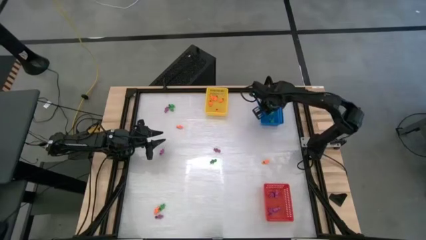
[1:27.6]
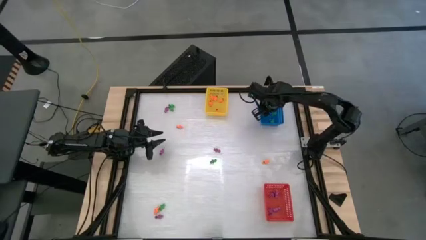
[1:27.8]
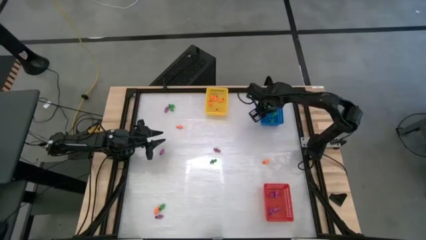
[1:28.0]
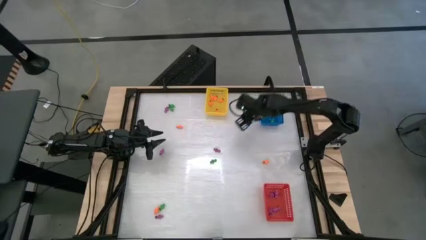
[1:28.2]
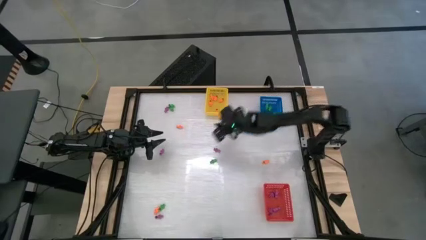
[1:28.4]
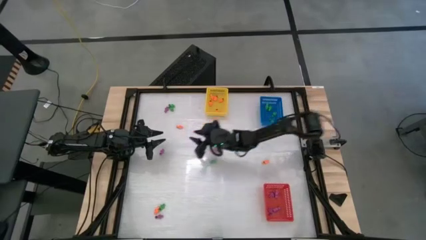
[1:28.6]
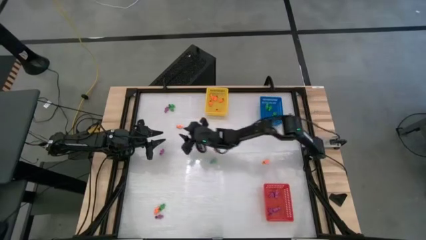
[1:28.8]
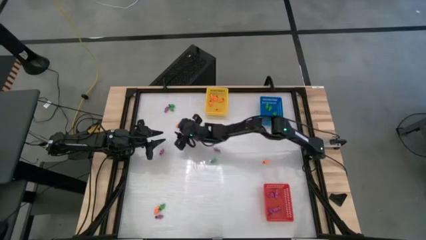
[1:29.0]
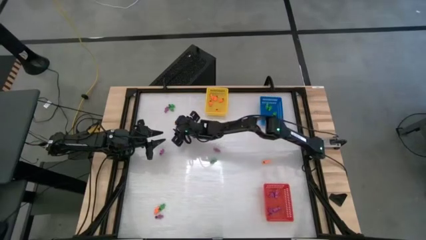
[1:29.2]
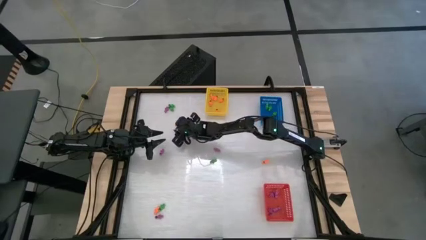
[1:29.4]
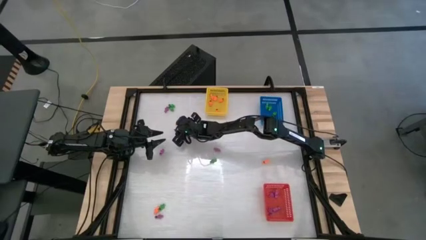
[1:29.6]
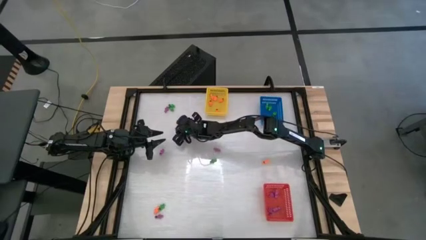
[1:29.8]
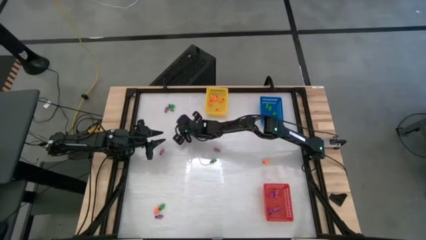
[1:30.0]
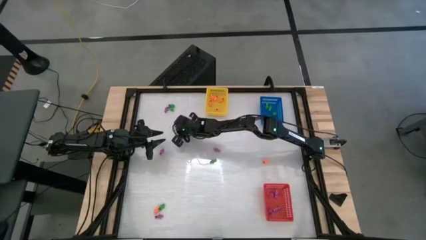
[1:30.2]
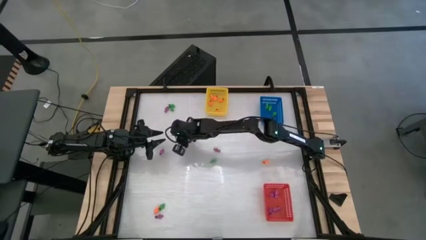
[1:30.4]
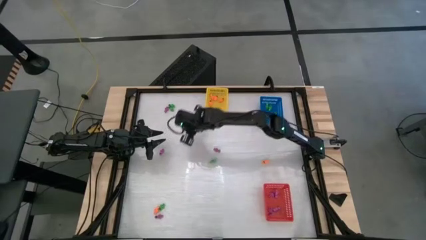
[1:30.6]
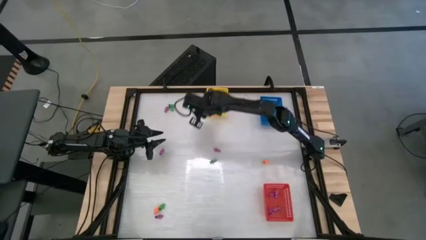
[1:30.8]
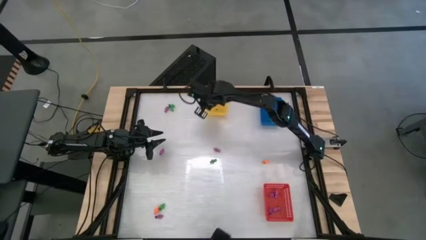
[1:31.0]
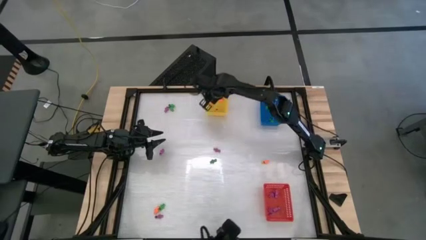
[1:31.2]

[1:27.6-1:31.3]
Task: Sort Halloween decoration
Put the orange skeleton toy into the yellow bin

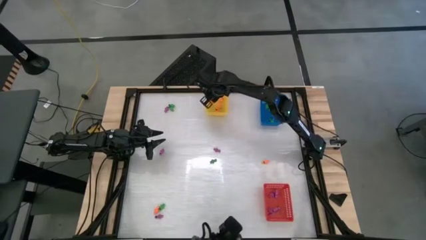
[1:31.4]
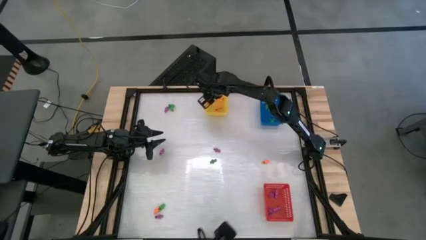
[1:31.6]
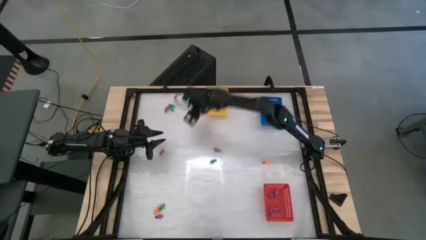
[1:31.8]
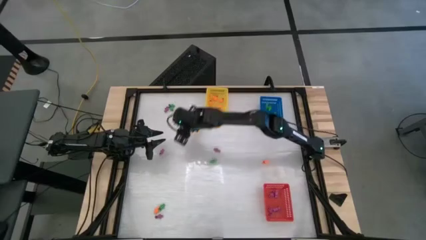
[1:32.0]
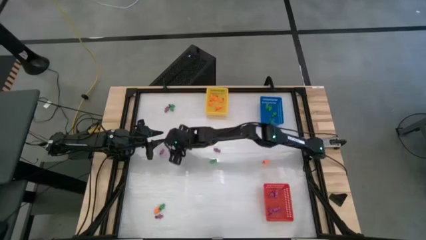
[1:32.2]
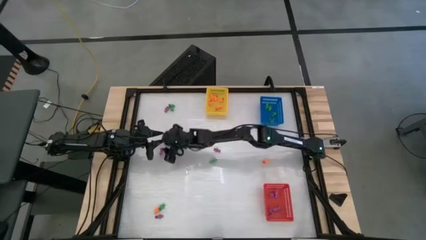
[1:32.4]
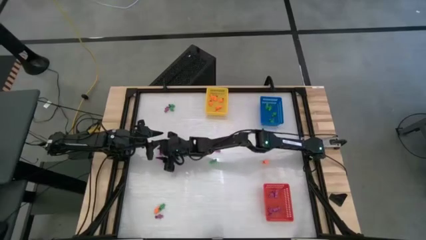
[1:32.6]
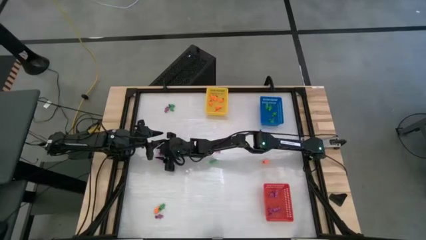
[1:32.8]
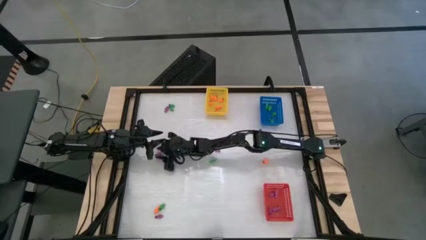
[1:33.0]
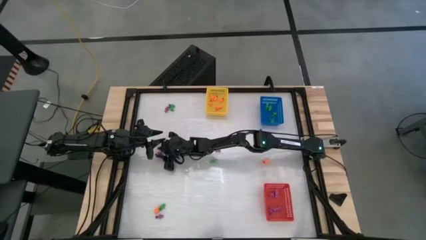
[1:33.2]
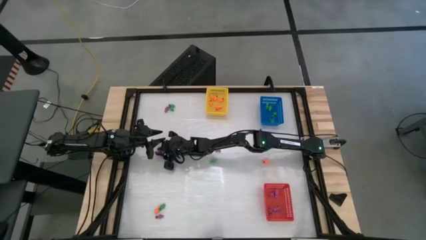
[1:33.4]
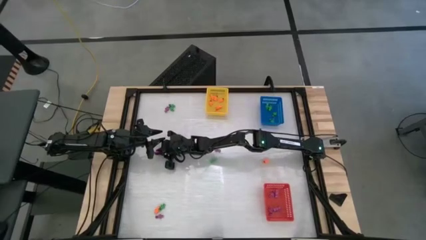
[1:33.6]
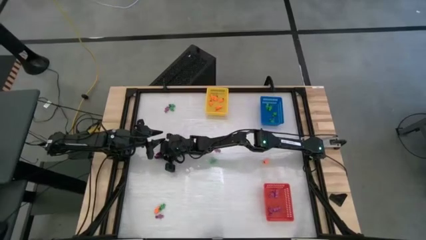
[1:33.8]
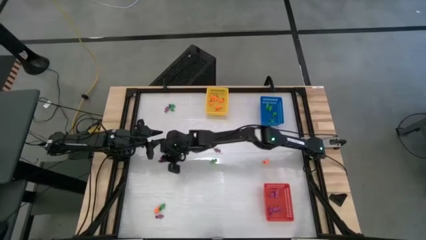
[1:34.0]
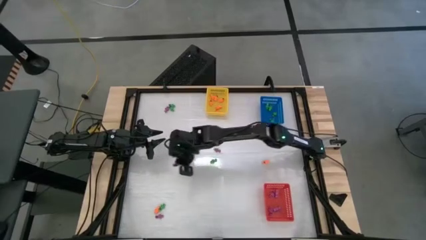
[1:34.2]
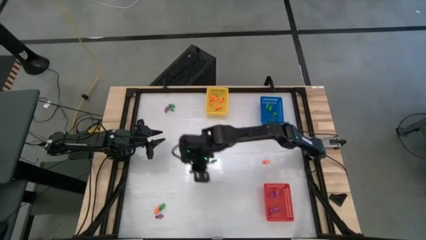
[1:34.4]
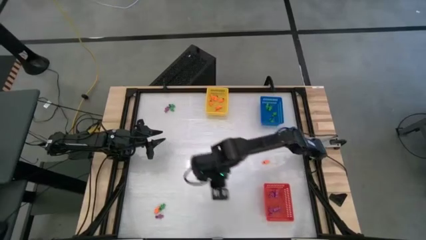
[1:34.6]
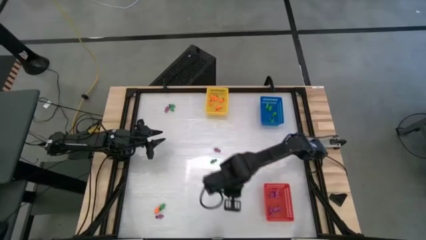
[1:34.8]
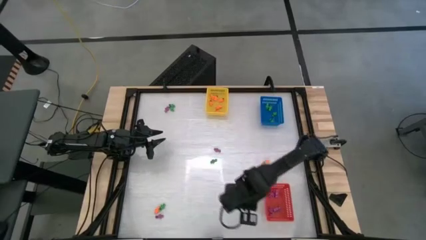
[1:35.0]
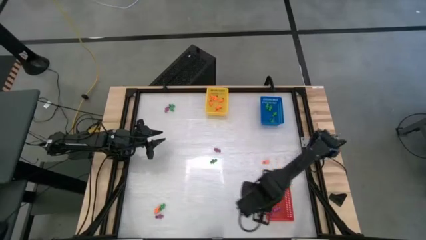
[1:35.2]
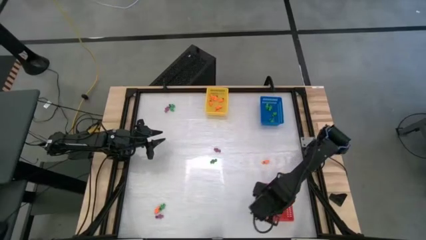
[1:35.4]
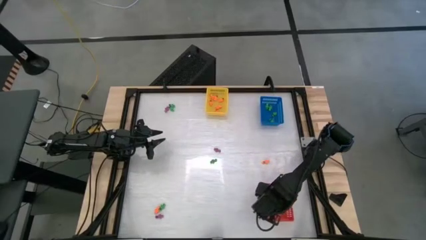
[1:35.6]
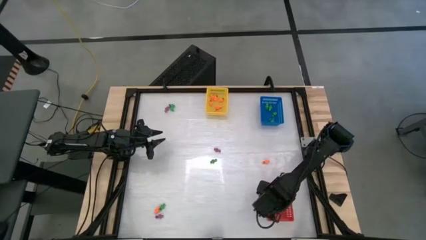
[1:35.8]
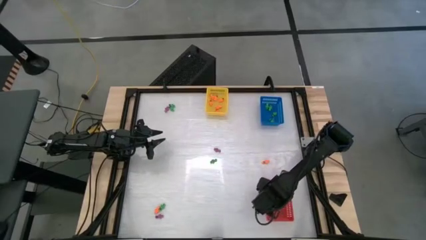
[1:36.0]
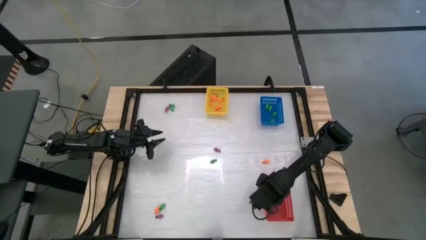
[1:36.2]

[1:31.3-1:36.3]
Put the violet skeleton toy into the red bin

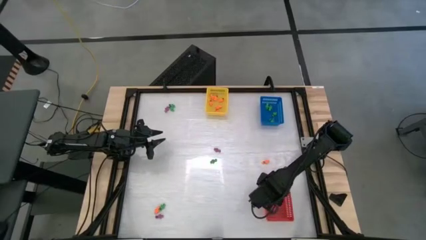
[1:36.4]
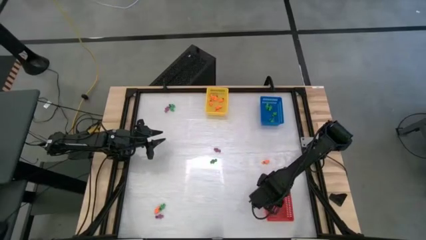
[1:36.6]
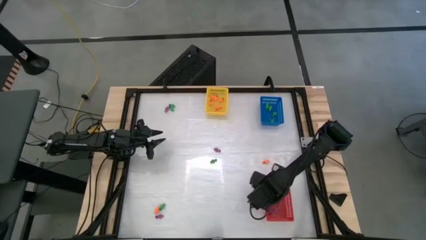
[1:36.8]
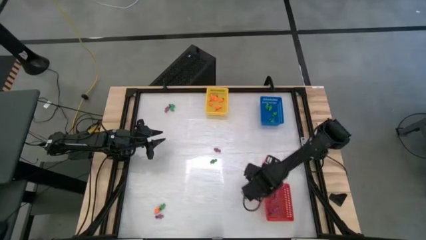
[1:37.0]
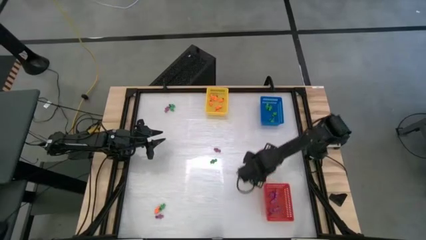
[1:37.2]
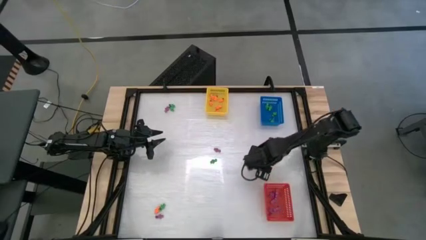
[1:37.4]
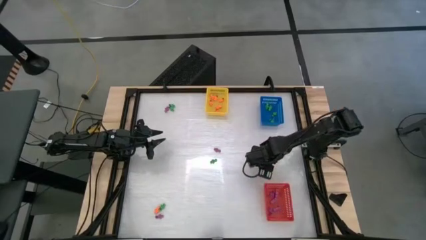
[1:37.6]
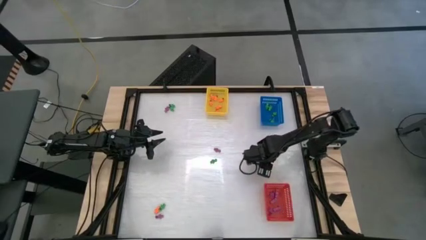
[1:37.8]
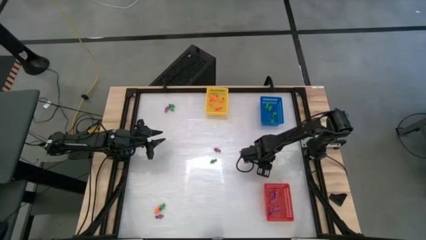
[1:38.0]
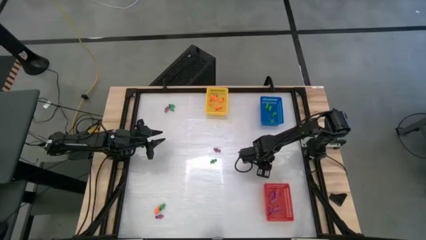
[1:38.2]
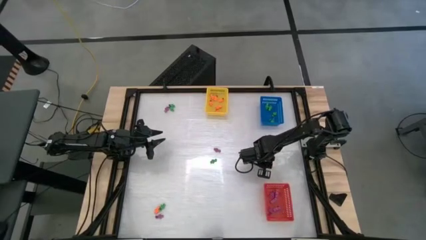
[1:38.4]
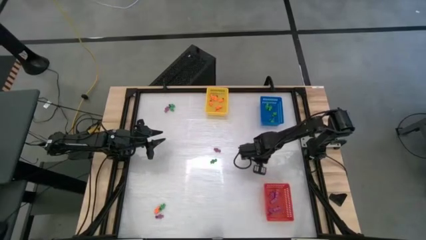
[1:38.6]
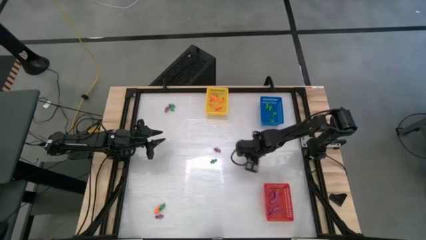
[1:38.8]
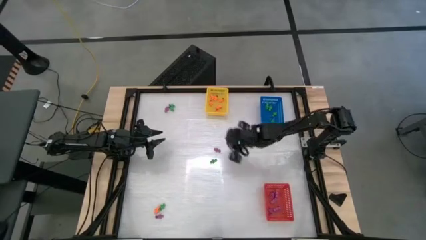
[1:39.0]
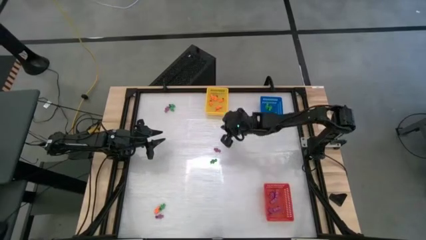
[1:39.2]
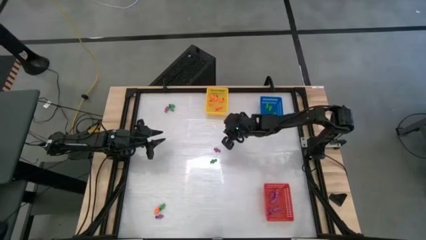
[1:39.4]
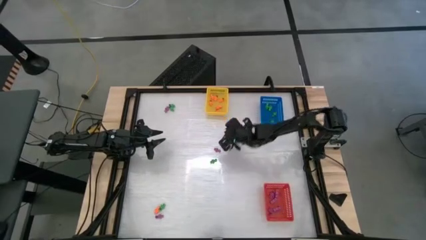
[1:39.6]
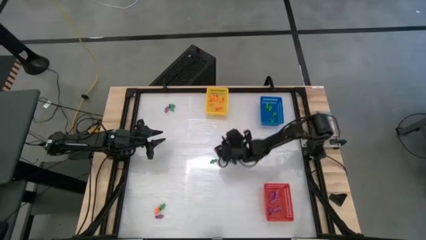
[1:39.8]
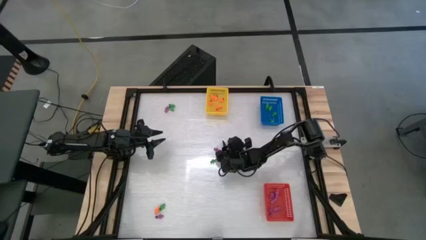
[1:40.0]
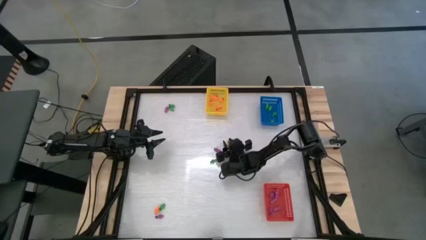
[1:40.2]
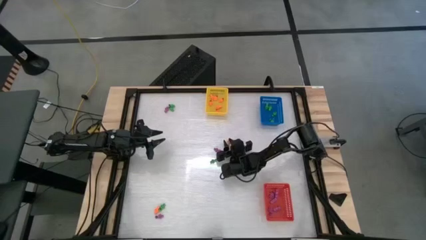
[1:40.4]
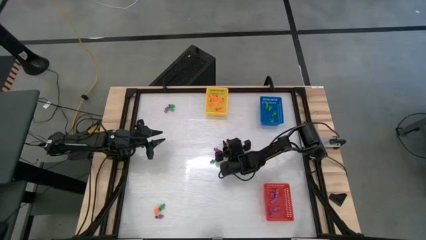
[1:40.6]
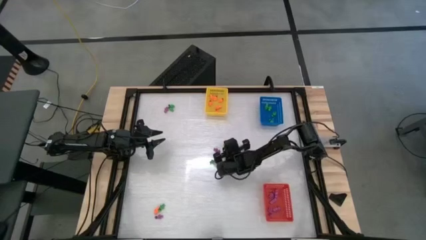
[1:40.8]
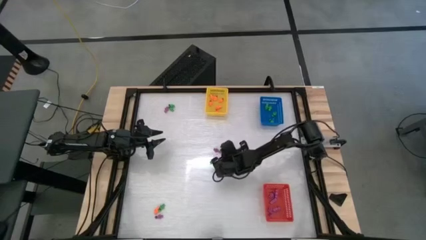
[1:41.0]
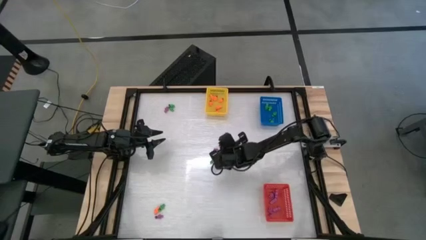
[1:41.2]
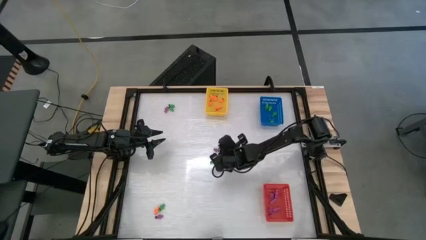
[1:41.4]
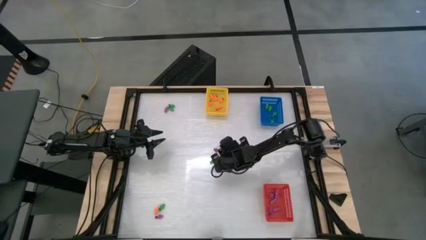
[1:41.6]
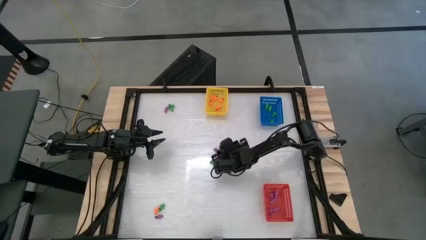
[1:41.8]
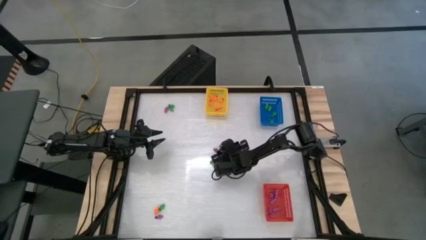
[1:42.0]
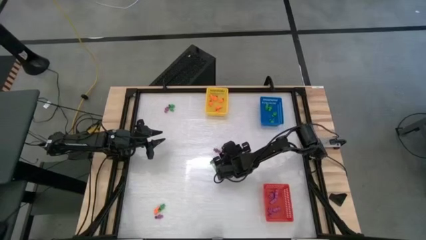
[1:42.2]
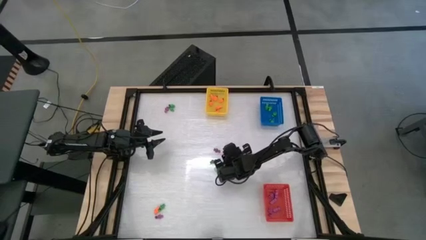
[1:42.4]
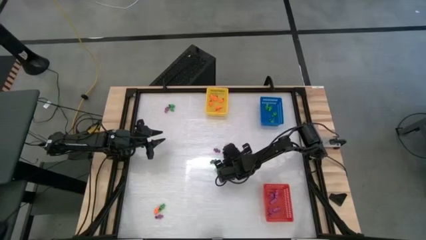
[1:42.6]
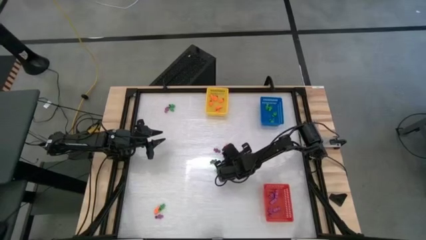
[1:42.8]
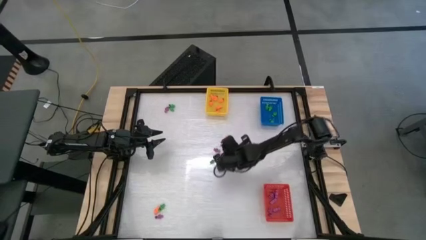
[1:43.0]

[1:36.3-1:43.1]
Put the orange skeleton toy into the yellow bin

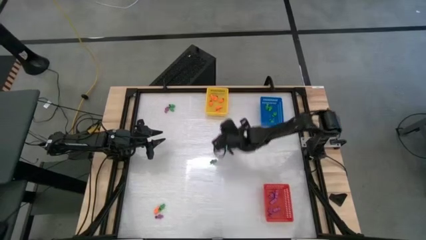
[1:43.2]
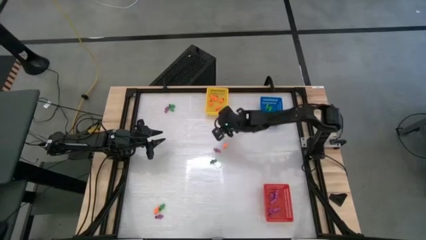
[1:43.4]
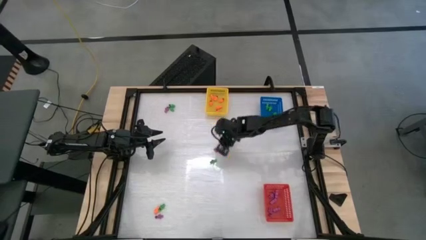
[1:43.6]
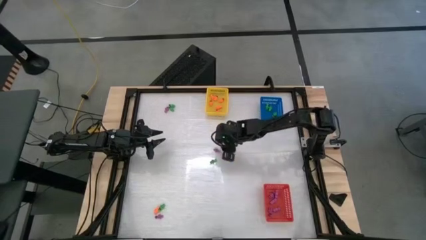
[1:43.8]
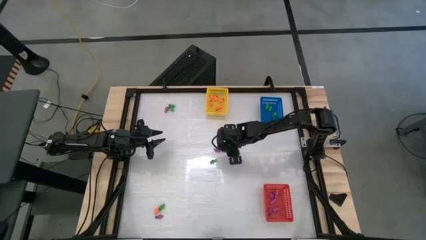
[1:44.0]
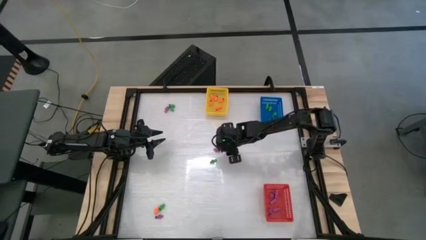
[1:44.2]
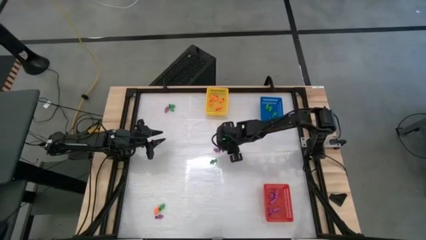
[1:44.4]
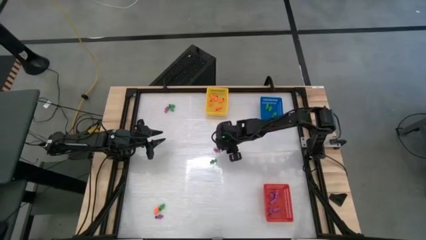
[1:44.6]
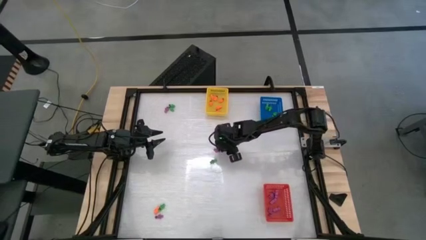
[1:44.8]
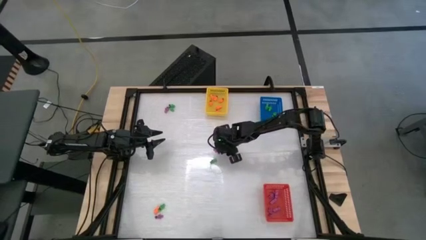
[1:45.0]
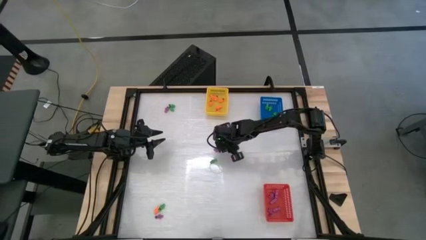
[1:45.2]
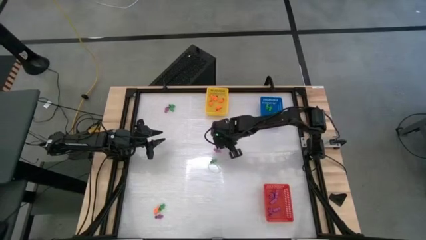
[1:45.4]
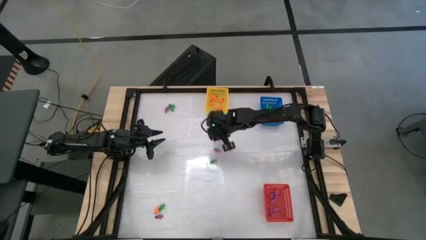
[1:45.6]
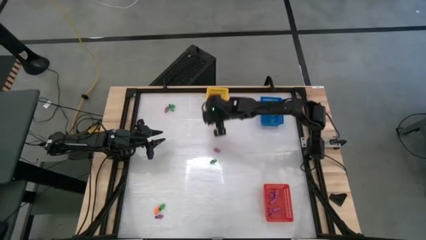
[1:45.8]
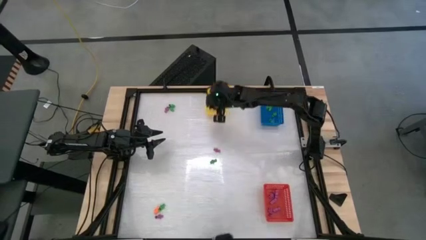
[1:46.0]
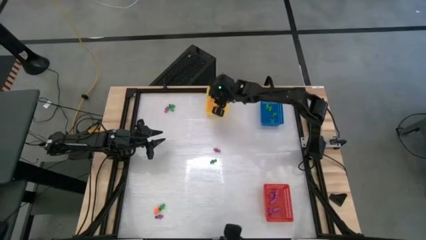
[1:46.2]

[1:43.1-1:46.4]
Put the orange skeleton toy into the yellow bin
